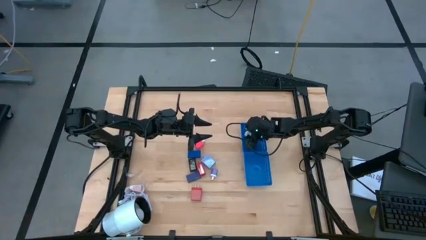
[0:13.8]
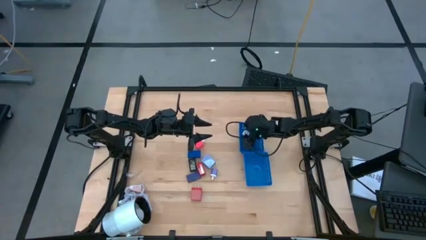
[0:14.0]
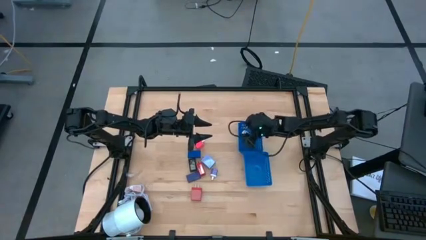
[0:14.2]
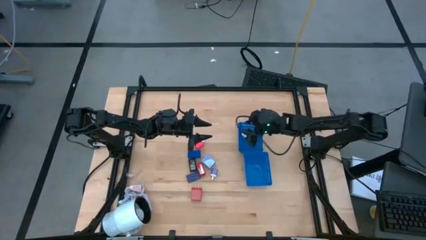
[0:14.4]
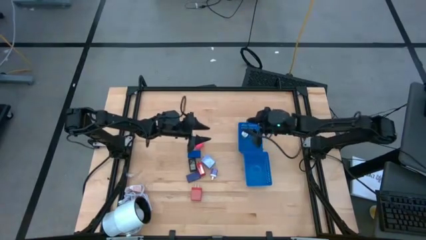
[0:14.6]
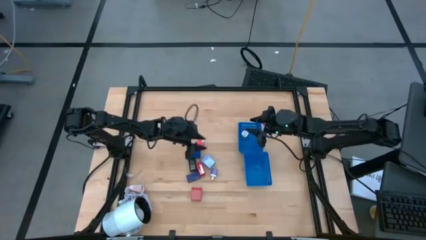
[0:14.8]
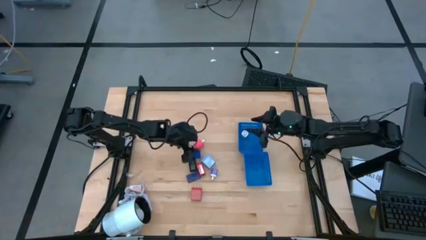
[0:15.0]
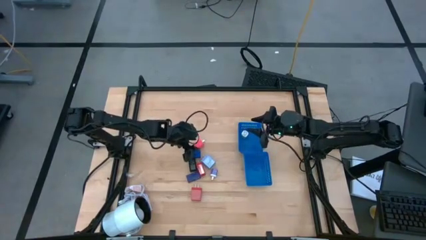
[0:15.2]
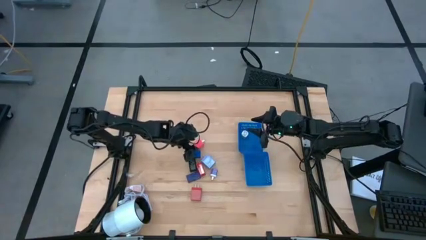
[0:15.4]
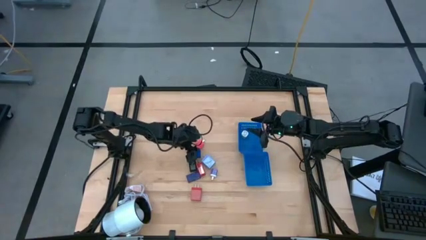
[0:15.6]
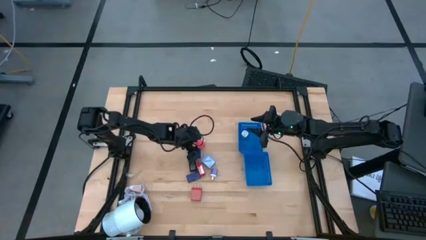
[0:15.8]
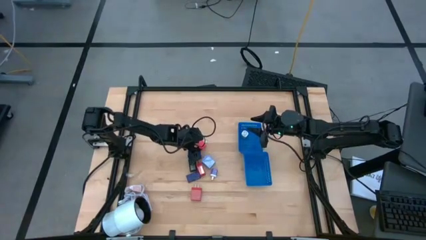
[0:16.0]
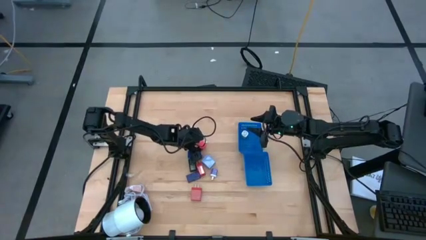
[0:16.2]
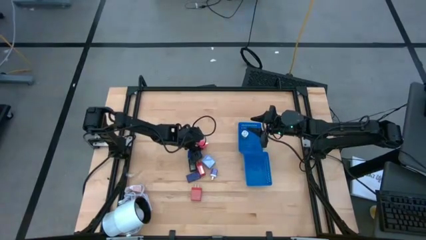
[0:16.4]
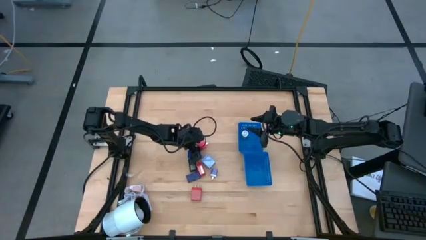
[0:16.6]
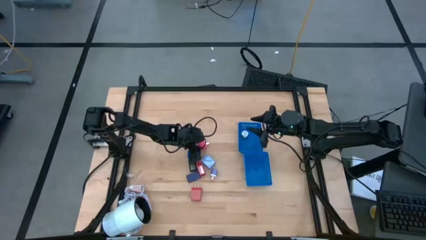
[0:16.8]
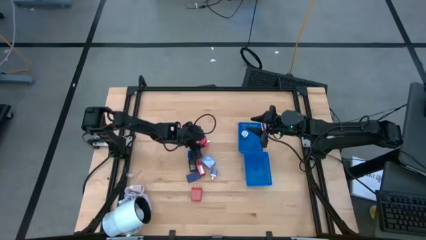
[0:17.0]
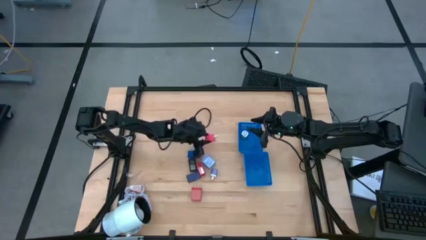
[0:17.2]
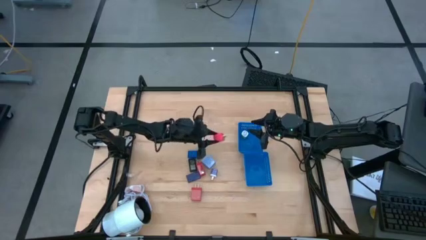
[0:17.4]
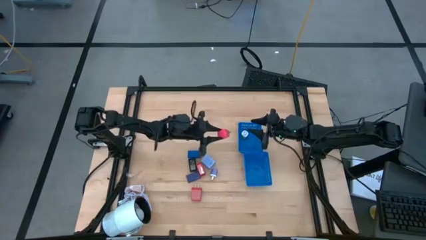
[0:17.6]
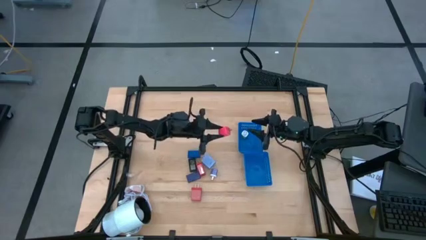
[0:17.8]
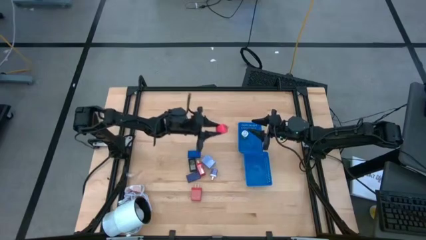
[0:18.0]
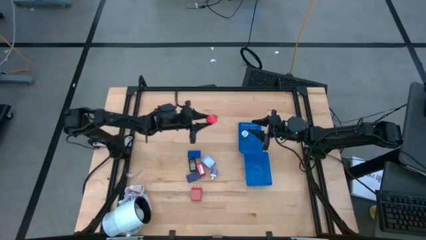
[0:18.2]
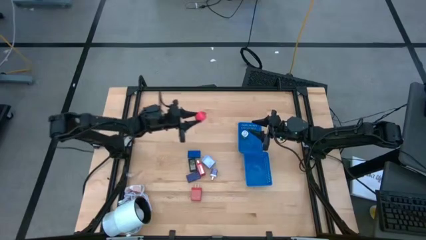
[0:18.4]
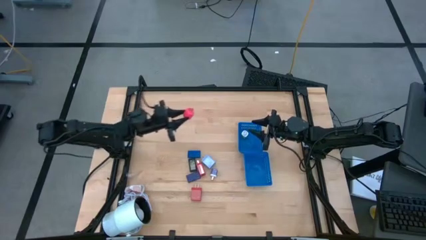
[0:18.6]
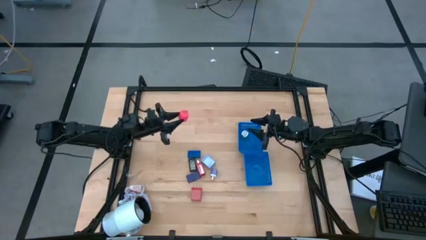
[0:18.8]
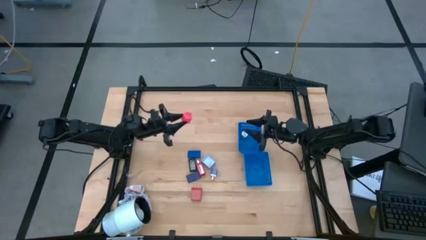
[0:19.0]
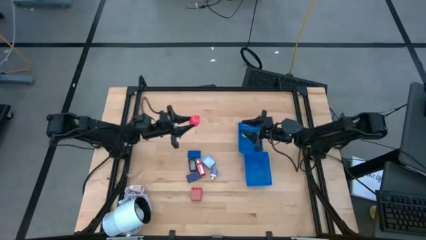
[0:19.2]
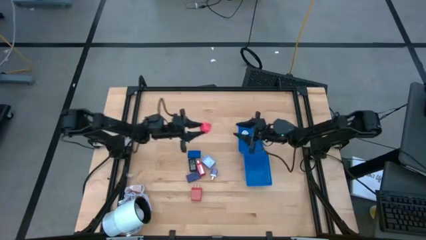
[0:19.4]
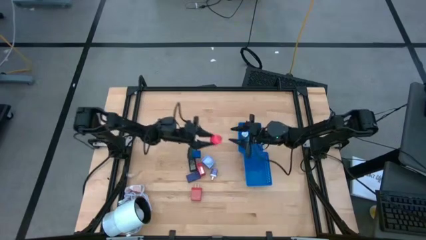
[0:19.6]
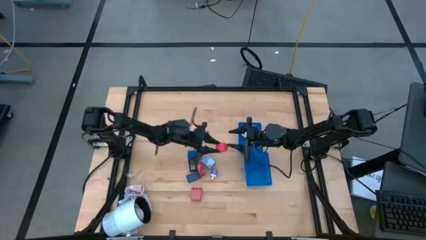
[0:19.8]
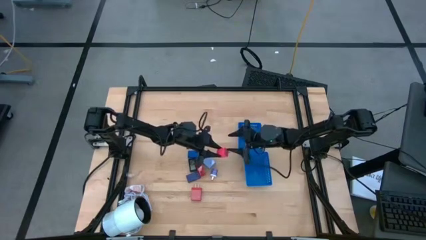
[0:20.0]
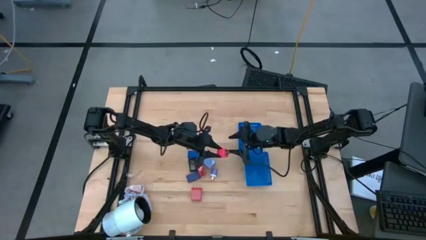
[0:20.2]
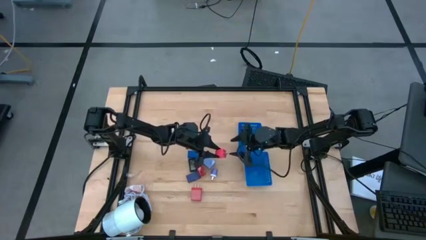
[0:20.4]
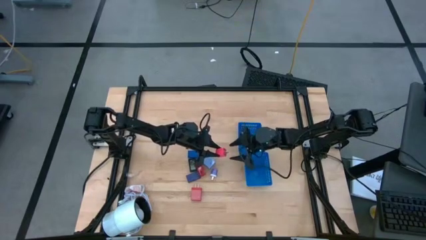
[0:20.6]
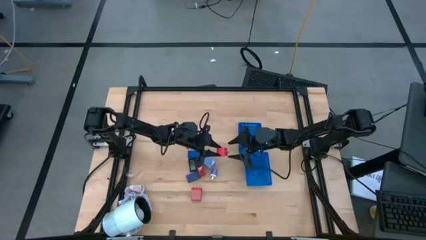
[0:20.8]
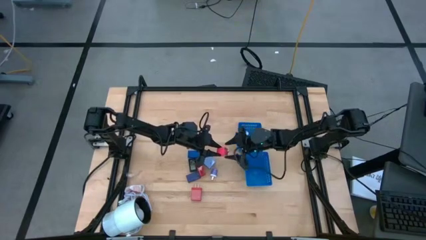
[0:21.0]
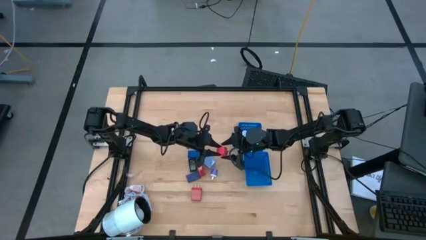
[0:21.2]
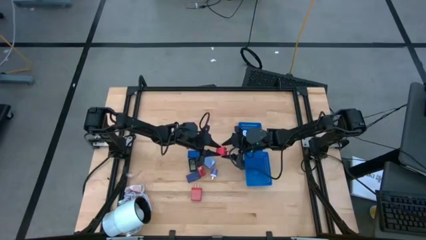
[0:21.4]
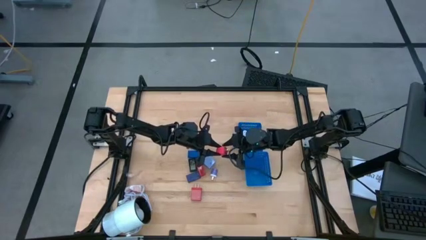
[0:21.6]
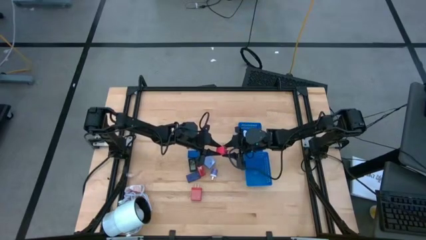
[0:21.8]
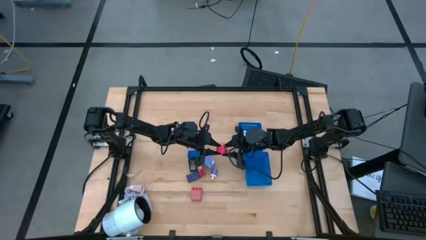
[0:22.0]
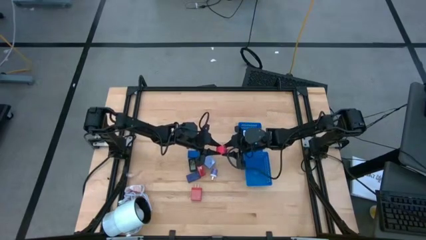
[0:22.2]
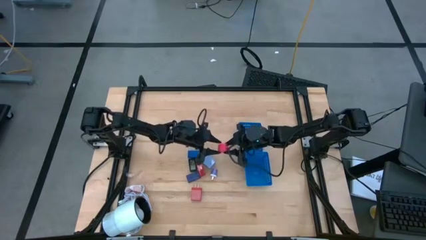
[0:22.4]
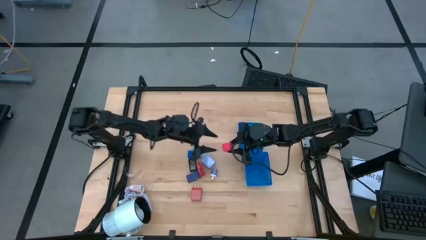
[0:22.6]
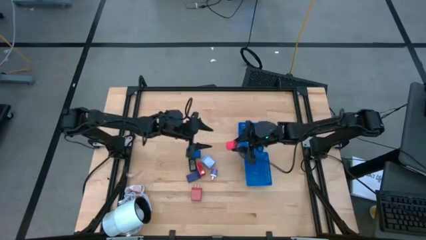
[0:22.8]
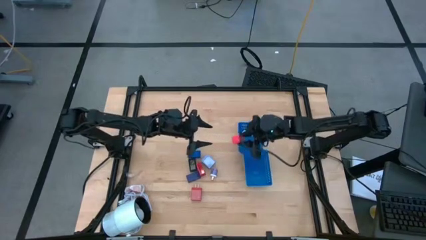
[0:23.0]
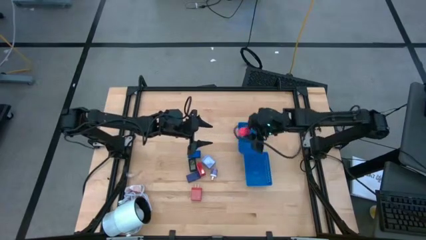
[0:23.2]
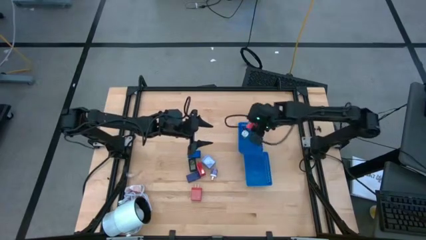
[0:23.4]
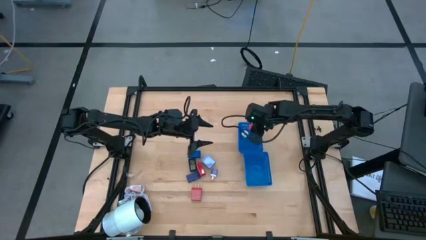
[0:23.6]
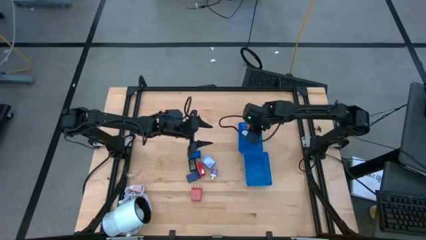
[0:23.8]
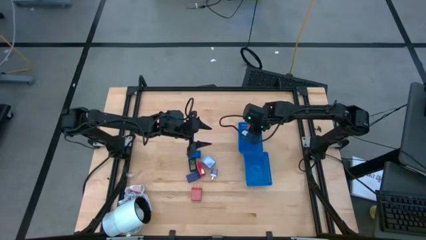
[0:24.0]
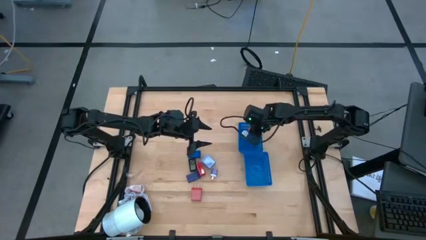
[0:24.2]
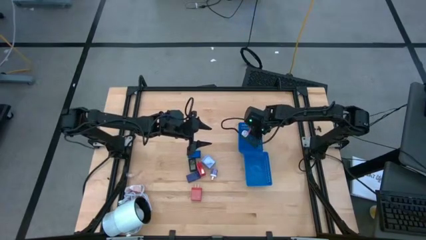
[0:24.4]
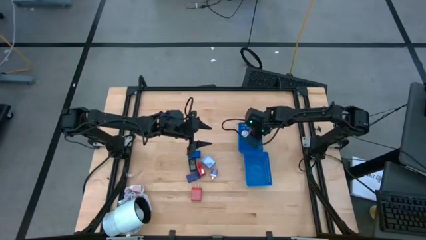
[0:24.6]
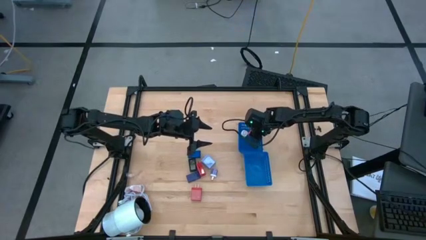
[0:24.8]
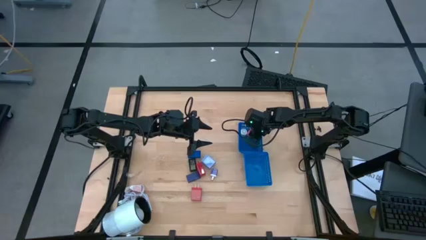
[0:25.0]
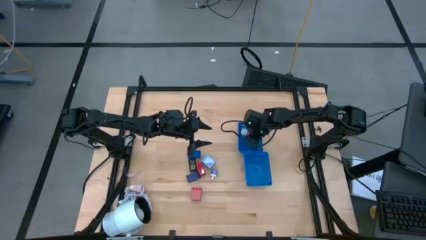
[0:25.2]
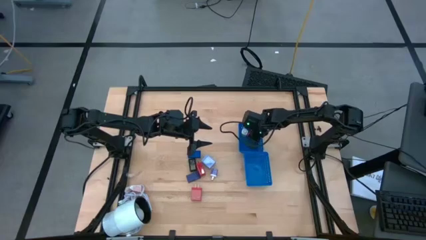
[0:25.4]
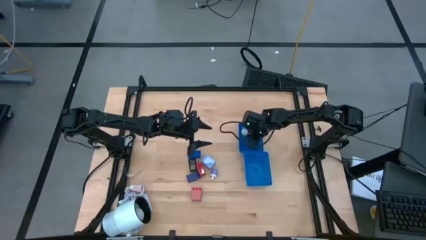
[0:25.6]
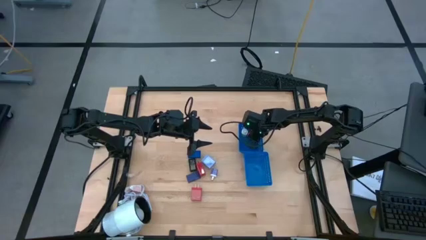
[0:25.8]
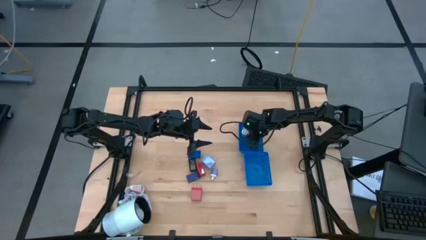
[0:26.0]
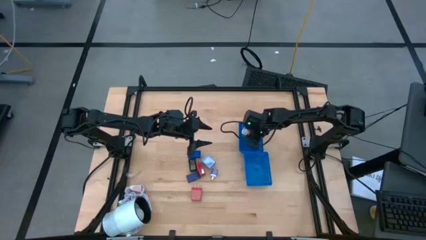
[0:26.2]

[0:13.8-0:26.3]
Task: Pick & Place Office items
Put the pink charger adapter into the top blue bin
